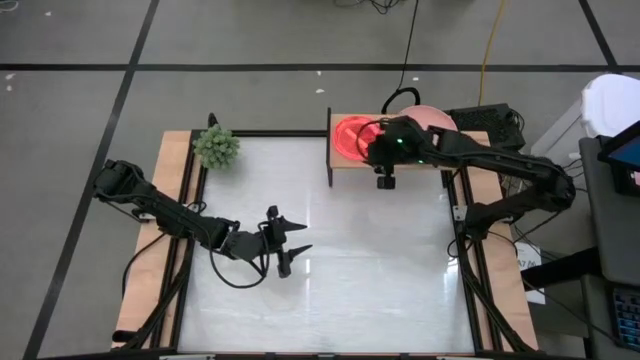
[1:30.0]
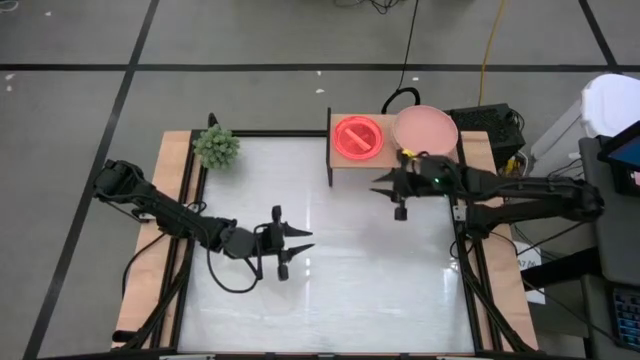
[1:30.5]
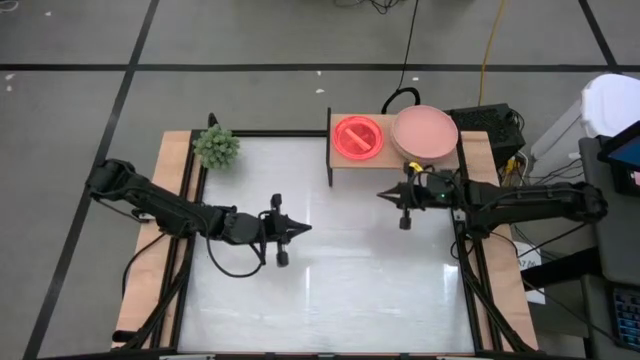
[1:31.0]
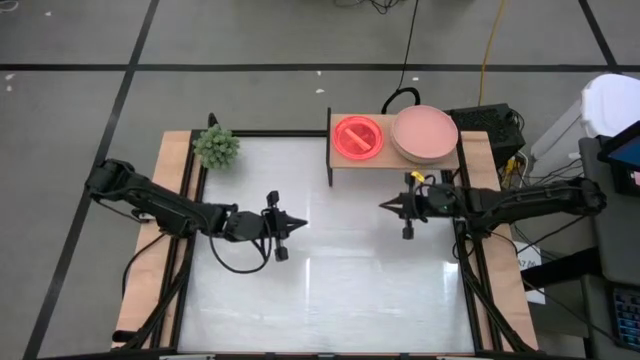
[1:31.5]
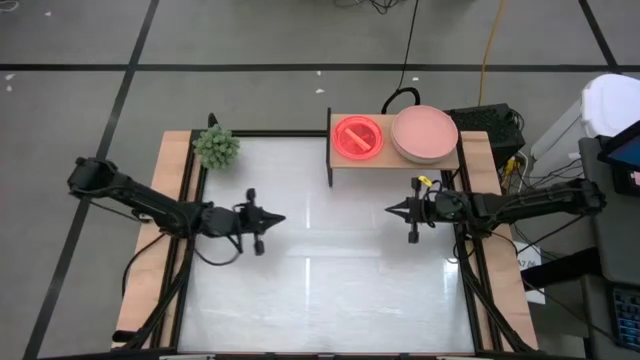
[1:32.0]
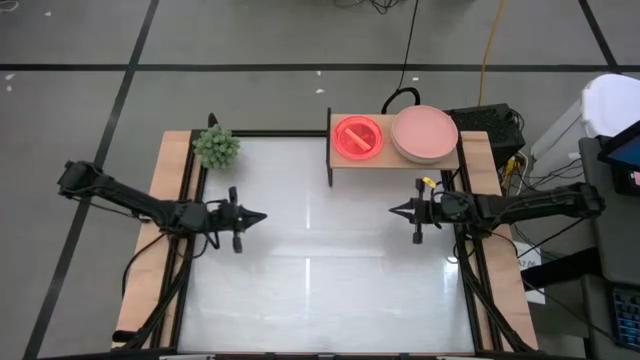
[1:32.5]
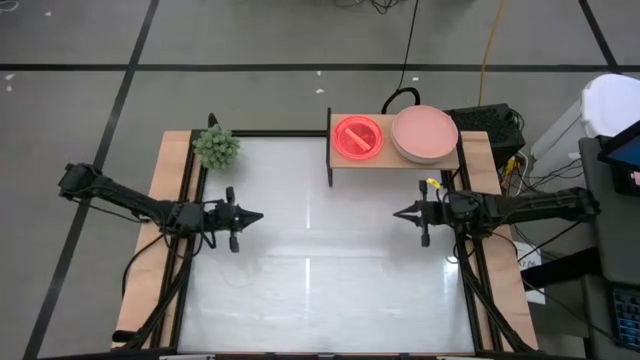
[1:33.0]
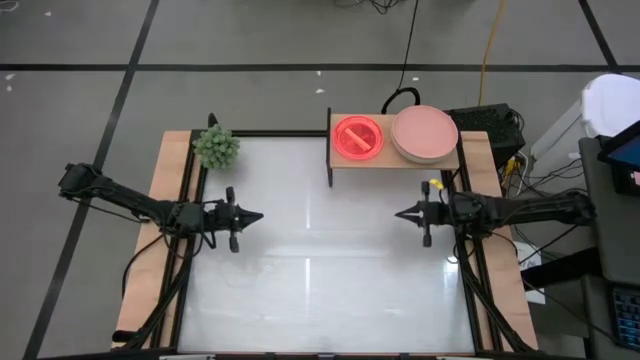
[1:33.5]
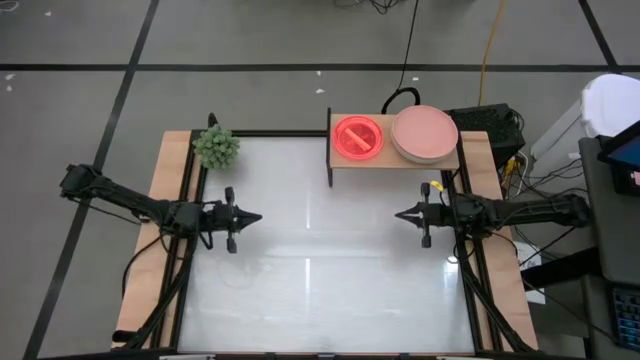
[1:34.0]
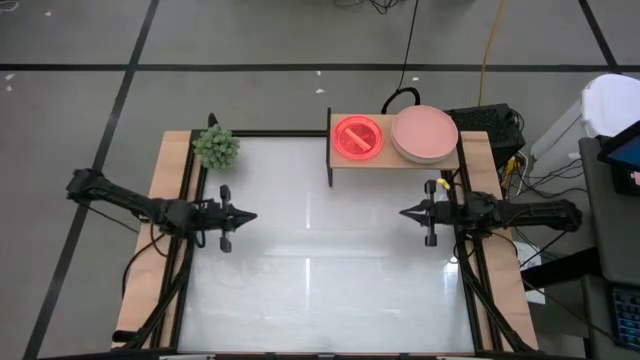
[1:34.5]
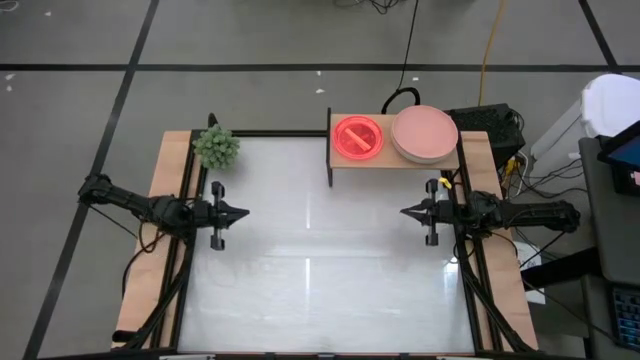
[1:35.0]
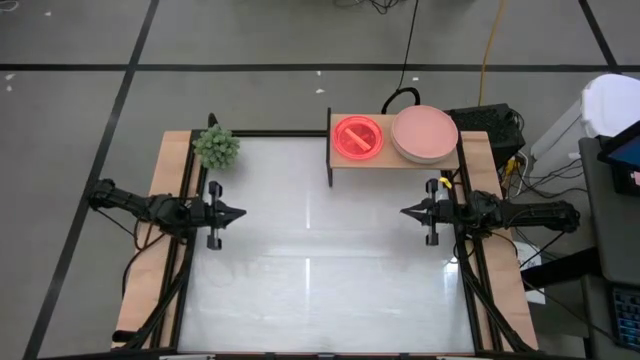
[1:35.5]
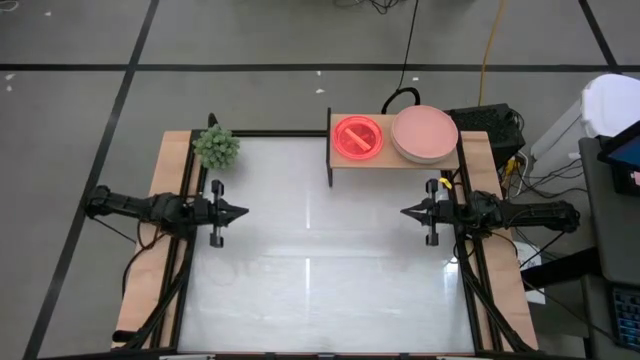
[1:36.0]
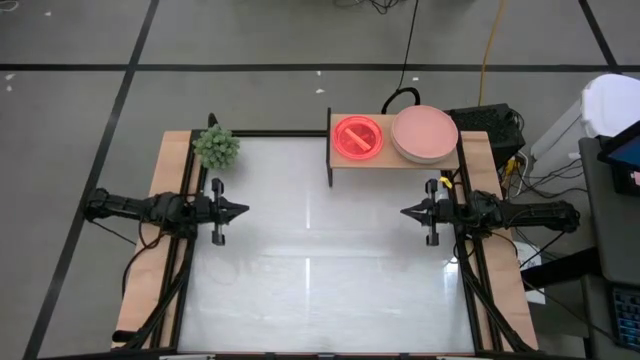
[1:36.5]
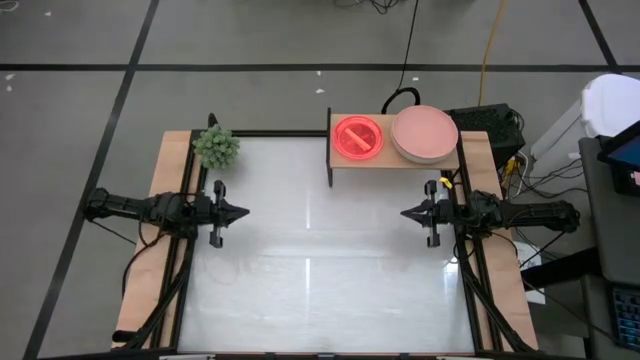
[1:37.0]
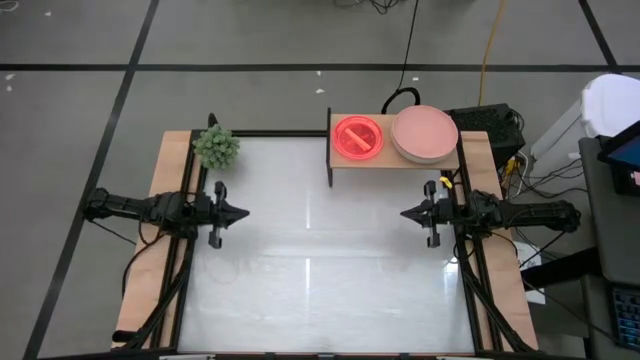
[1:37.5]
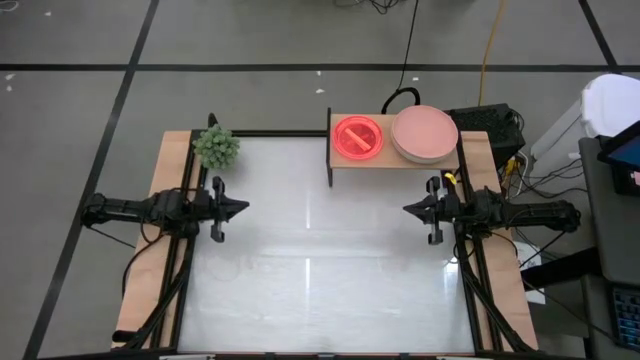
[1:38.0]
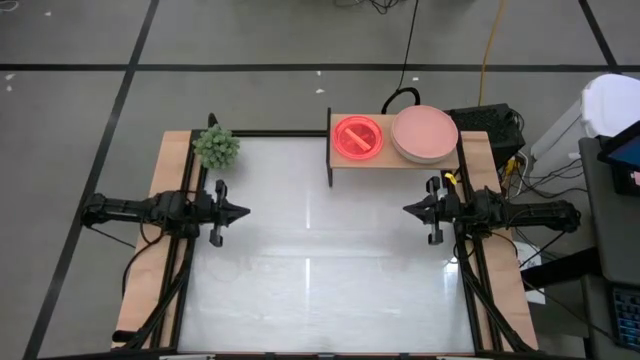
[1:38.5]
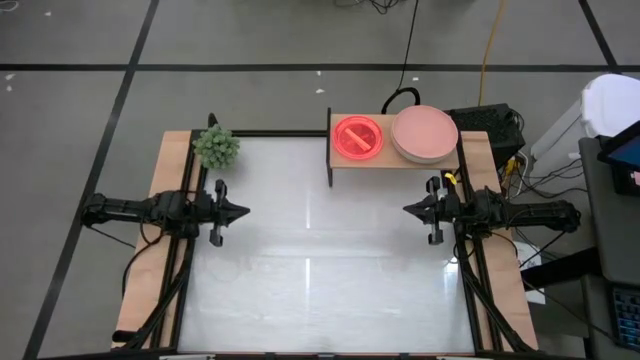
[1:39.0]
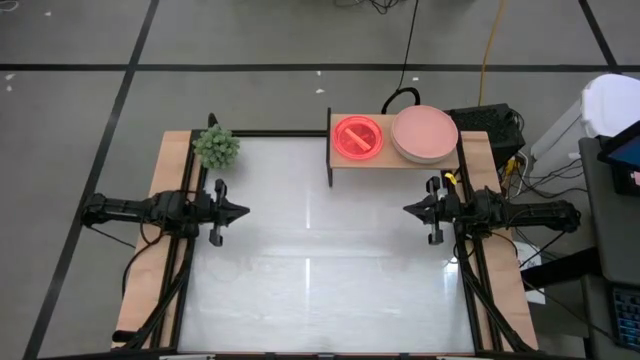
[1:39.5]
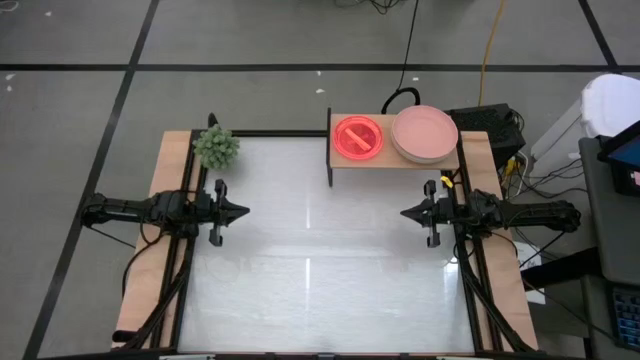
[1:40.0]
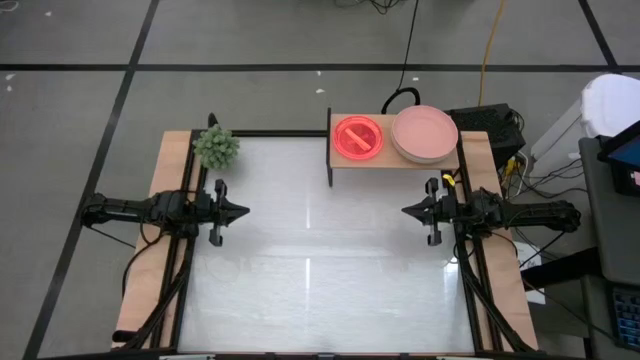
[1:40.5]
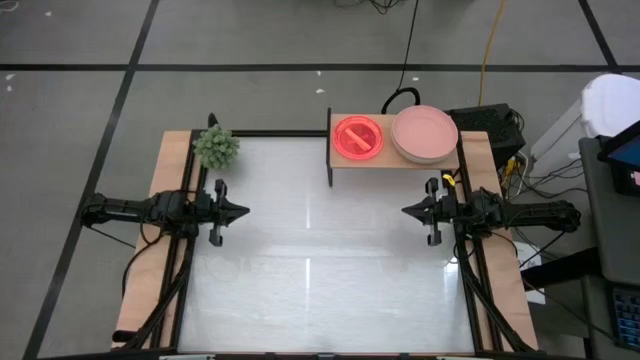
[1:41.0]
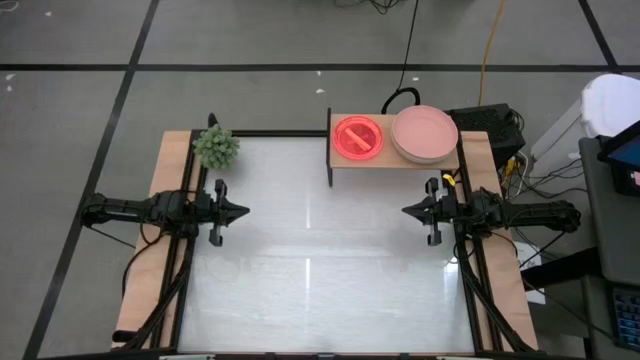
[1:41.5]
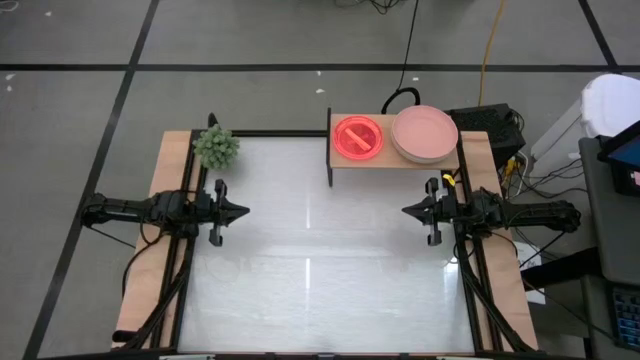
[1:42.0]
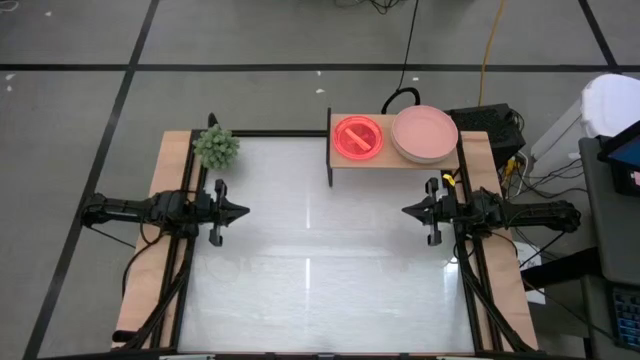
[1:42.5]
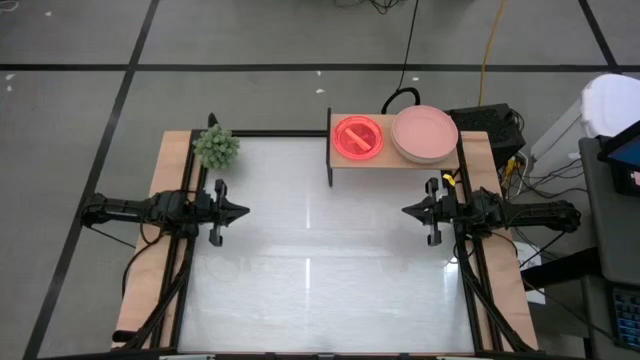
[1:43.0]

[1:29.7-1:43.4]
Task: Place and stack plates onto a shelf
Return To Home Position

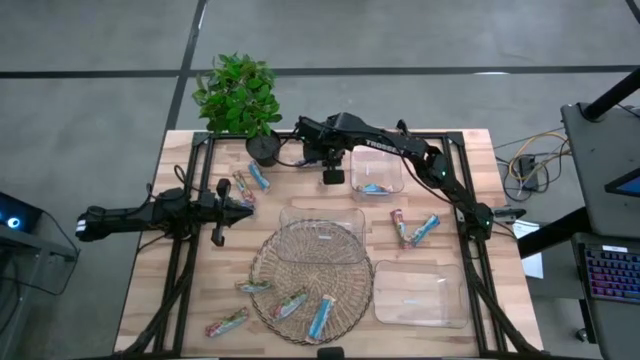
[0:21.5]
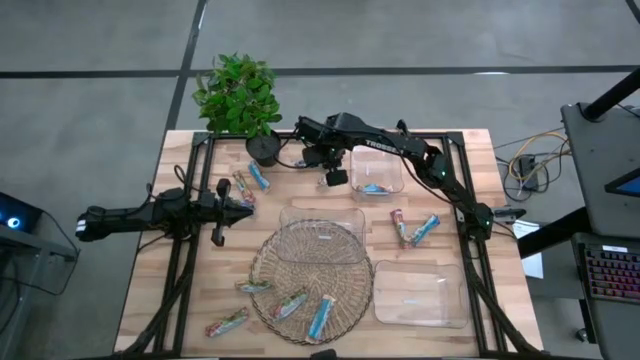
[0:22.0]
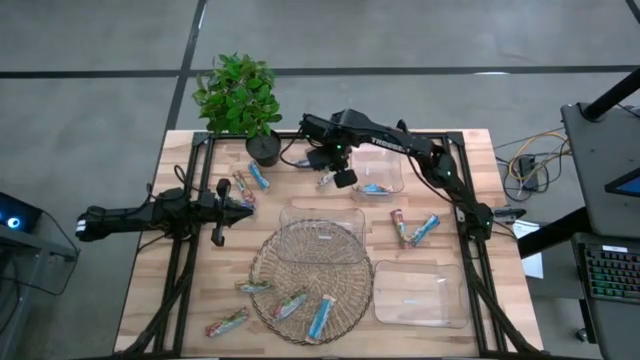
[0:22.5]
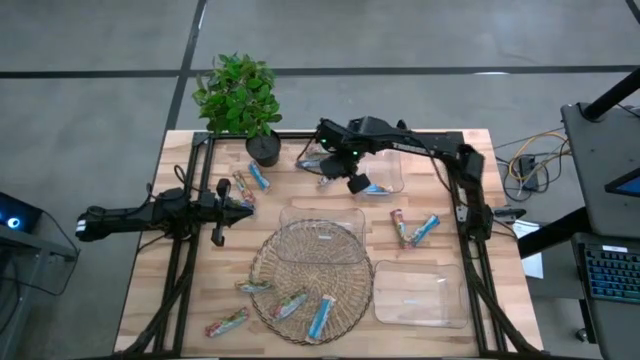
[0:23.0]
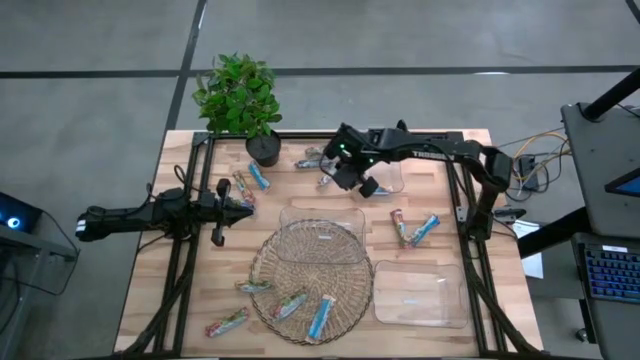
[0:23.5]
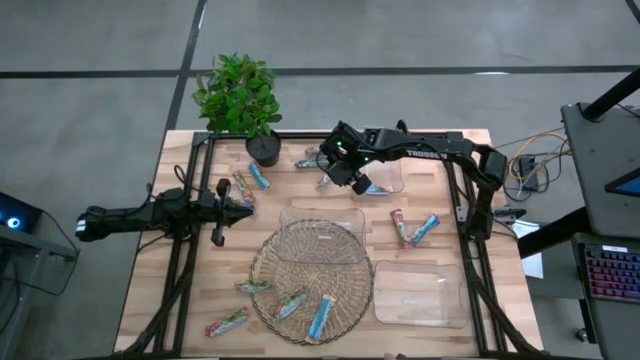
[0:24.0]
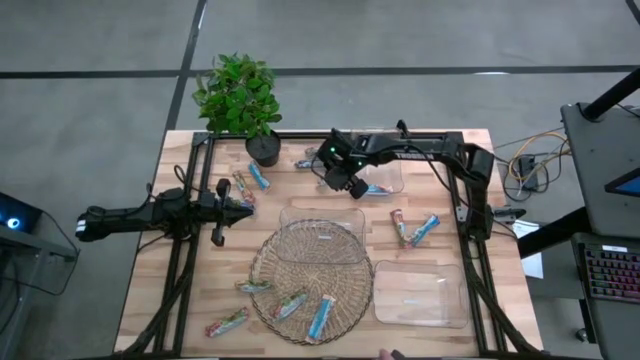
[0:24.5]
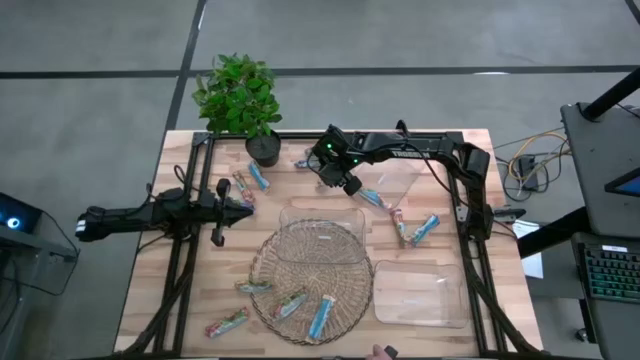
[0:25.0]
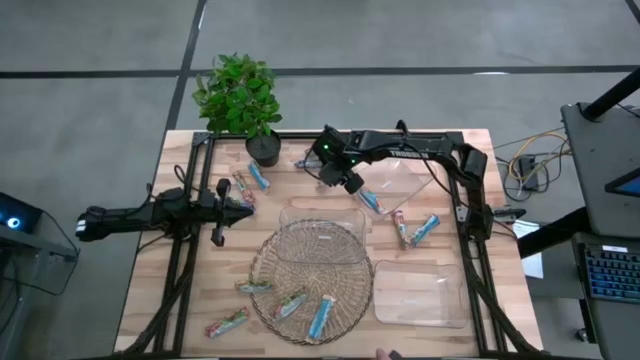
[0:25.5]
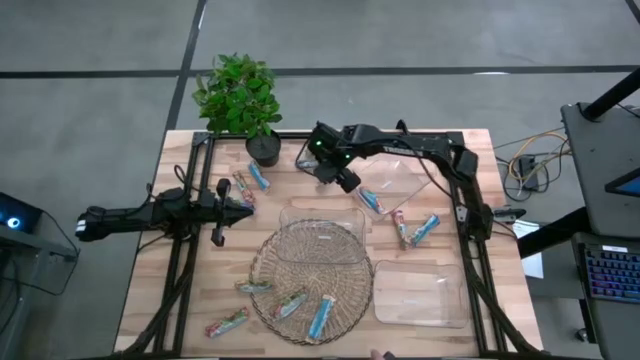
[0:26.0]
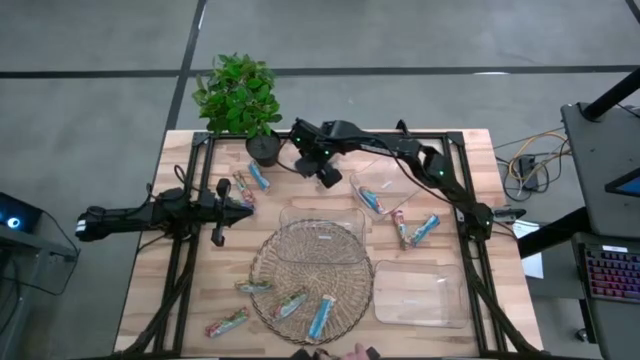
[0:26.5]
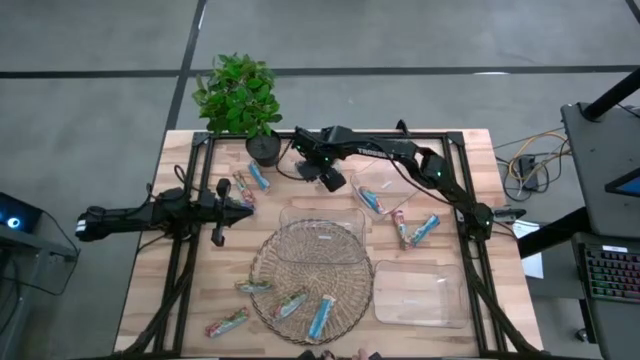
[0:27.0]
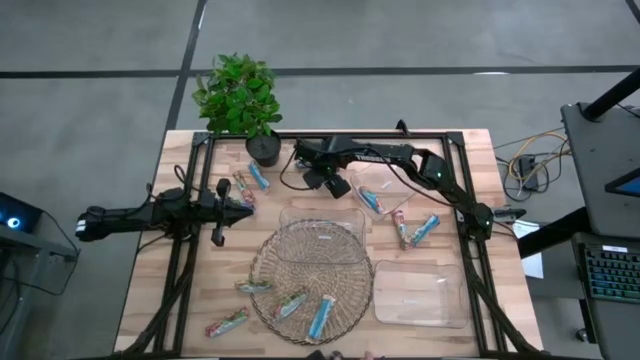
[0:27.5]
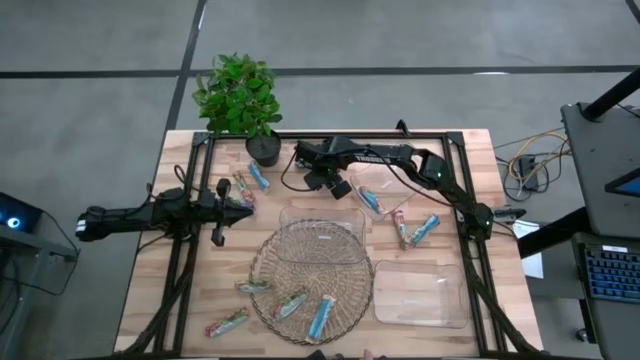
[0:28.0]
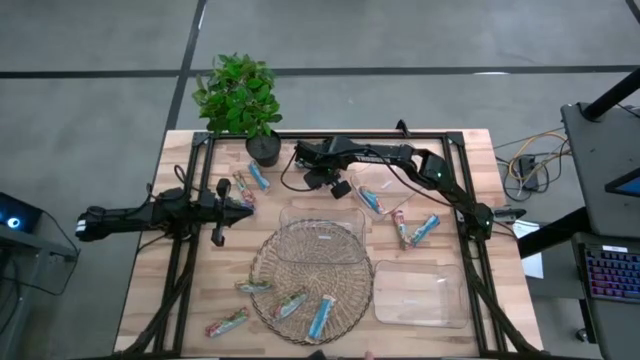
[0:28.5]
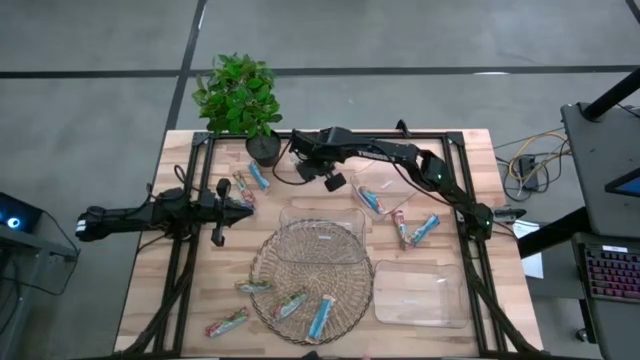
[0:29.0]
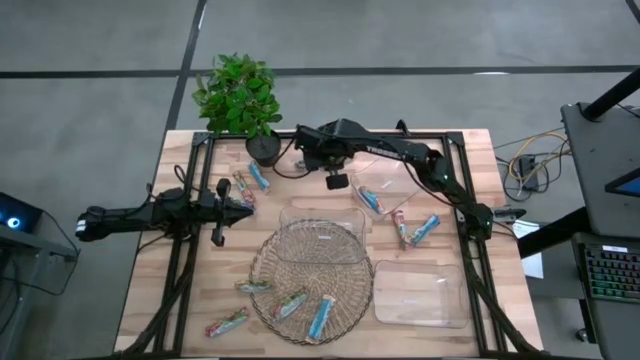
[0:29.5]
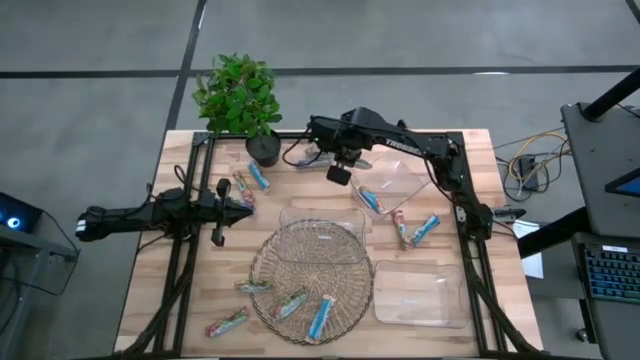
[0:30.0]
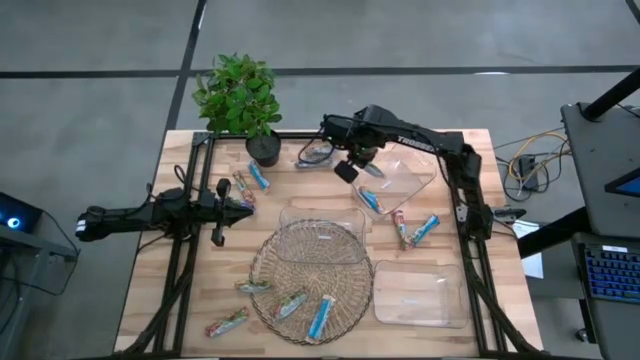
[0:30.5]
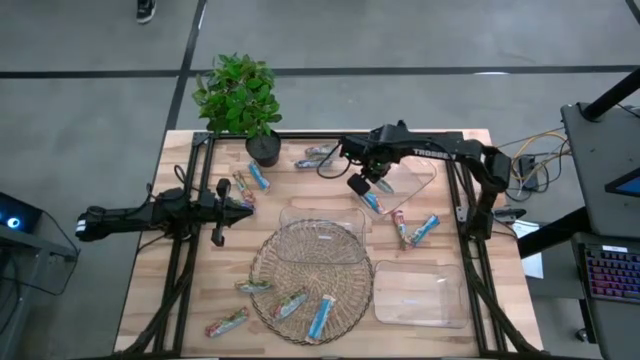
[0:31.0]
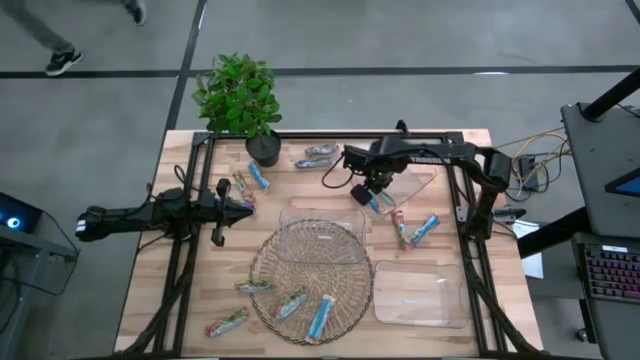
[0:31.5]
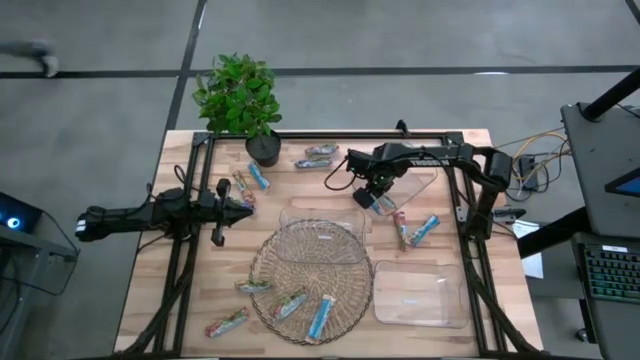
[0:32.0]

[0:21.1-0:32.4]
Task: Pick and place Granola Bars by type
Put the yellow granola bar into the top transparent bin
